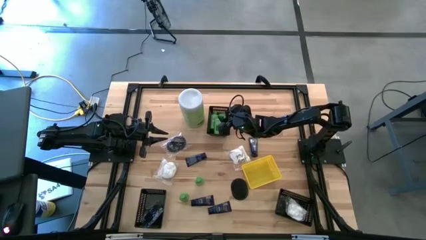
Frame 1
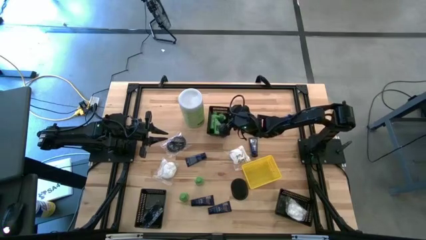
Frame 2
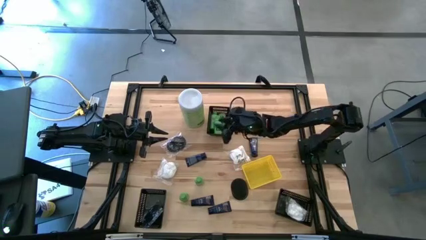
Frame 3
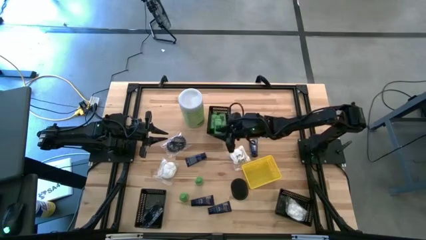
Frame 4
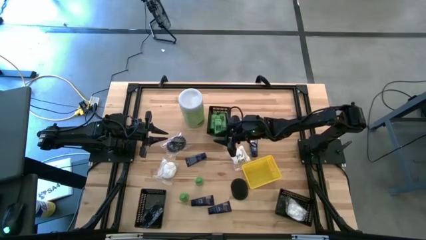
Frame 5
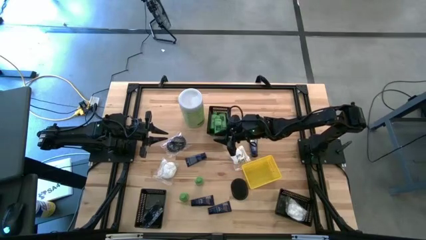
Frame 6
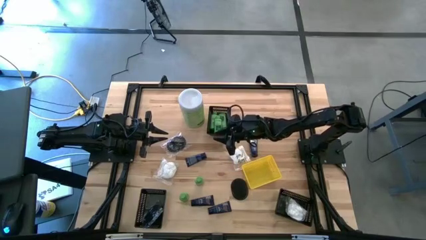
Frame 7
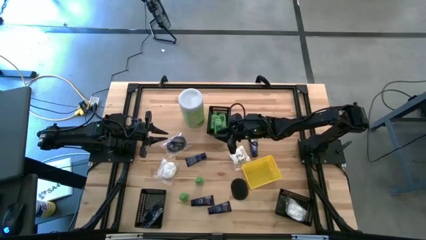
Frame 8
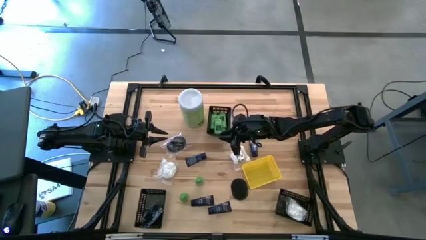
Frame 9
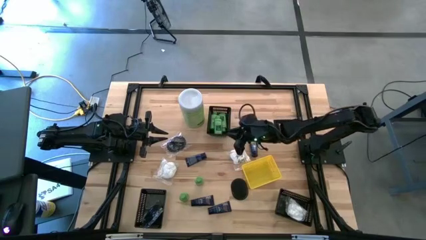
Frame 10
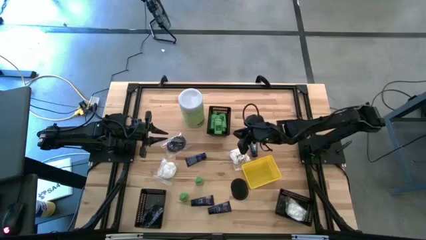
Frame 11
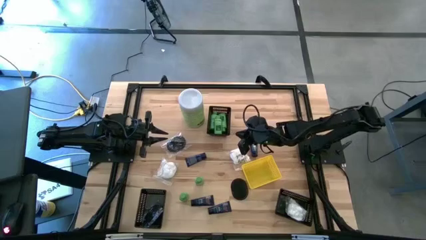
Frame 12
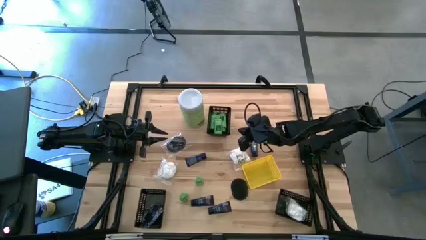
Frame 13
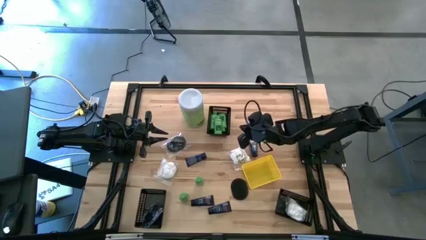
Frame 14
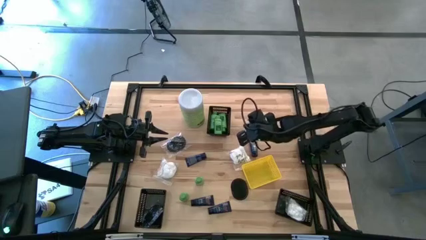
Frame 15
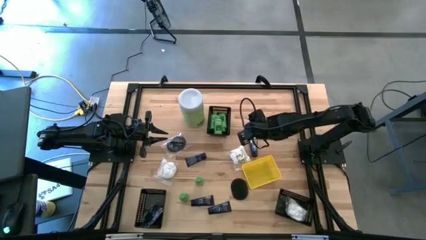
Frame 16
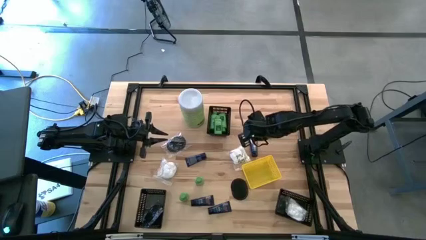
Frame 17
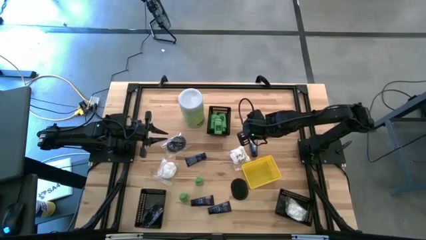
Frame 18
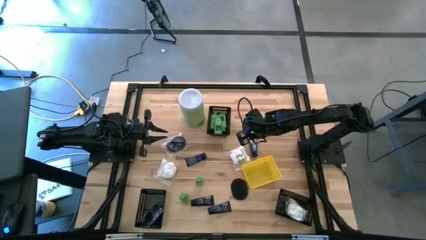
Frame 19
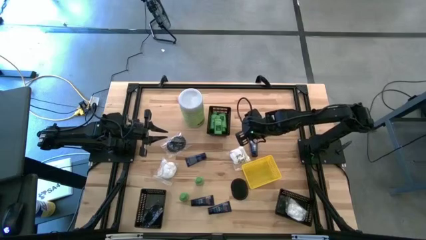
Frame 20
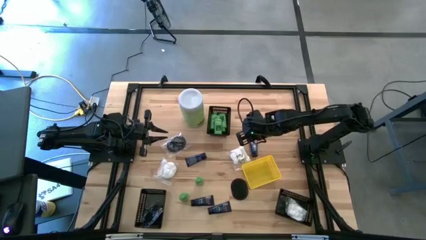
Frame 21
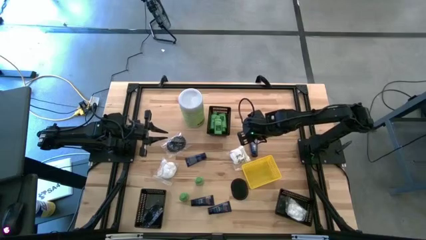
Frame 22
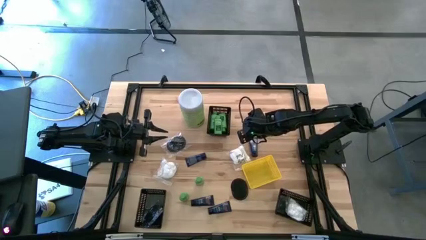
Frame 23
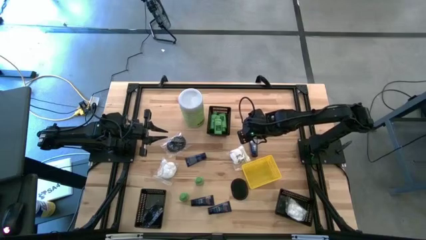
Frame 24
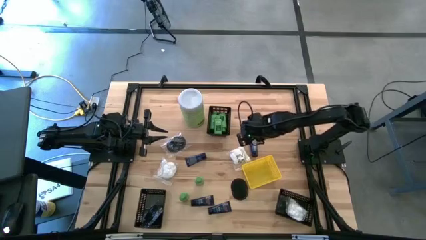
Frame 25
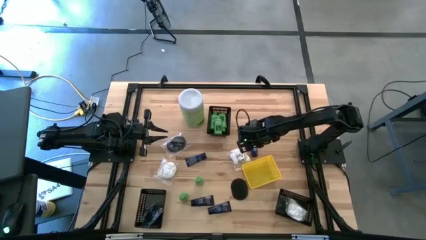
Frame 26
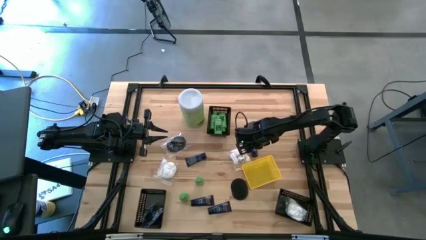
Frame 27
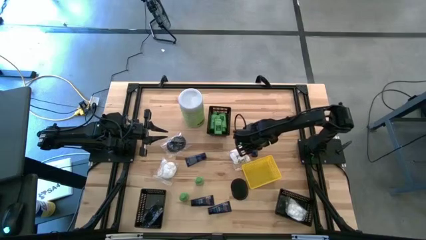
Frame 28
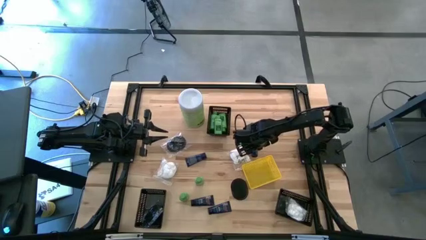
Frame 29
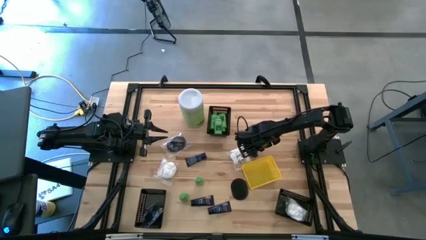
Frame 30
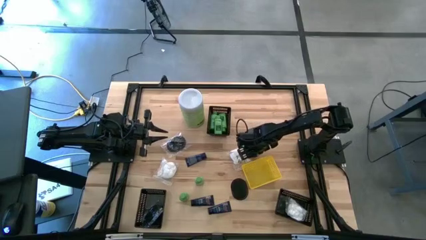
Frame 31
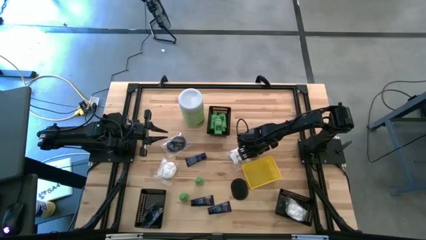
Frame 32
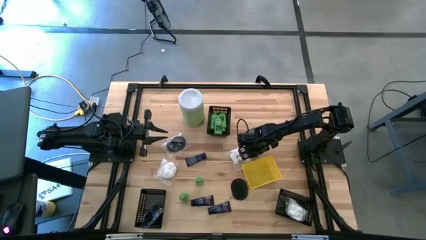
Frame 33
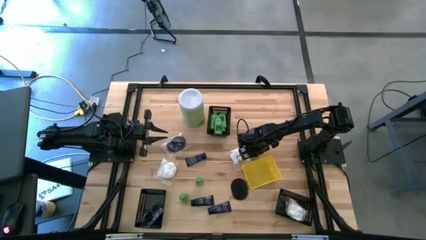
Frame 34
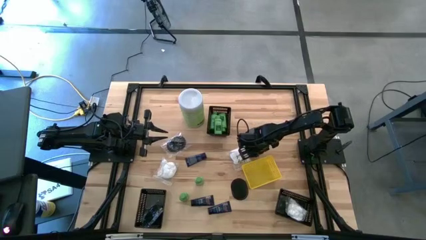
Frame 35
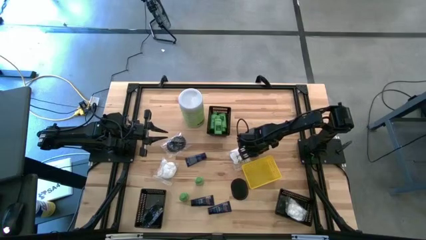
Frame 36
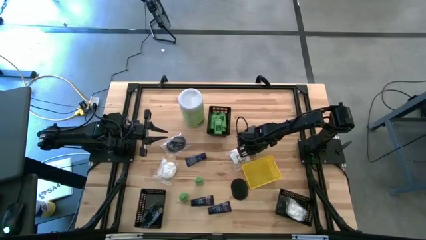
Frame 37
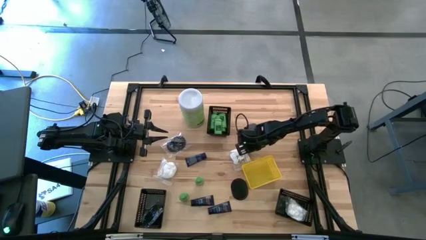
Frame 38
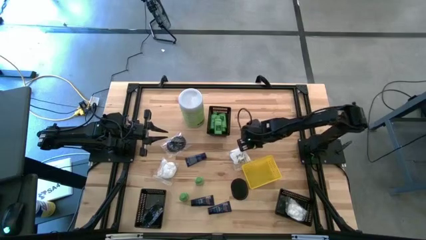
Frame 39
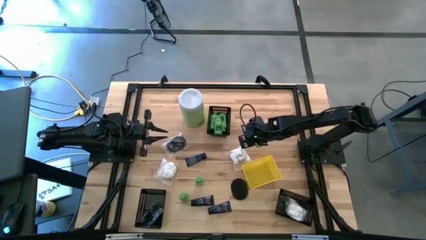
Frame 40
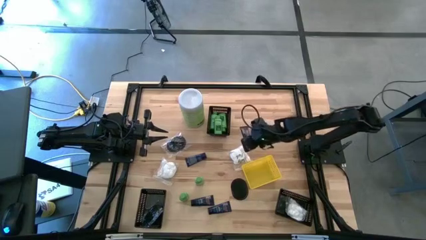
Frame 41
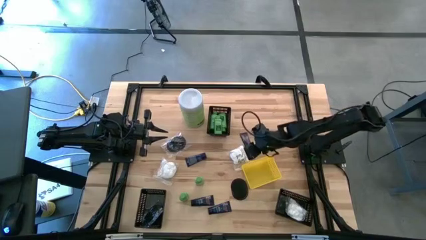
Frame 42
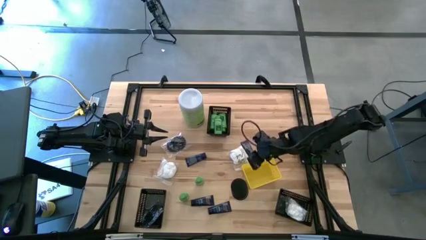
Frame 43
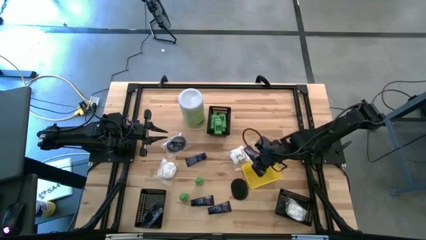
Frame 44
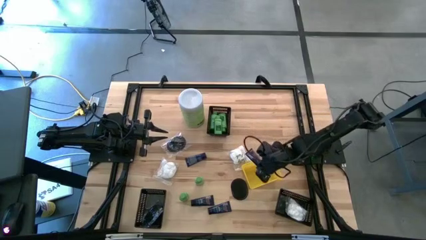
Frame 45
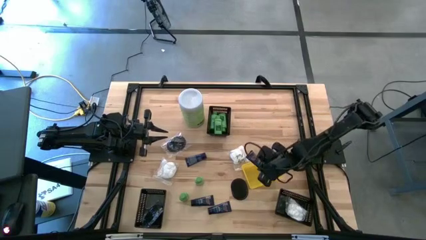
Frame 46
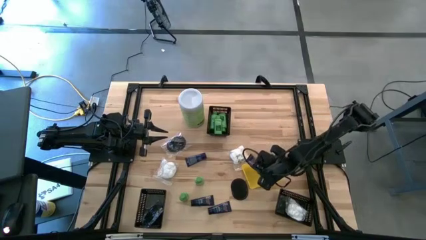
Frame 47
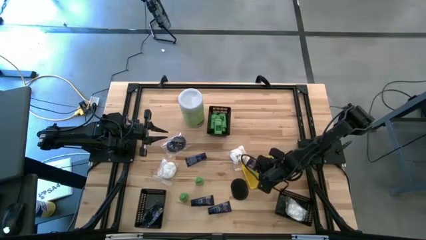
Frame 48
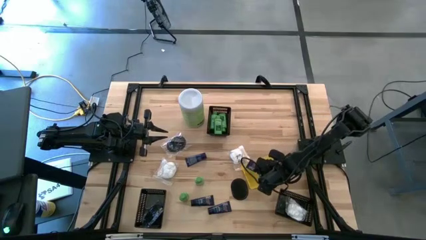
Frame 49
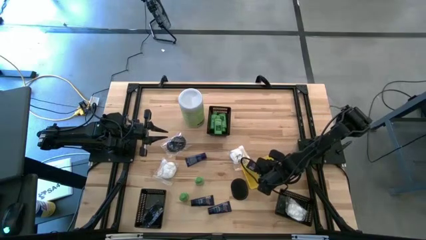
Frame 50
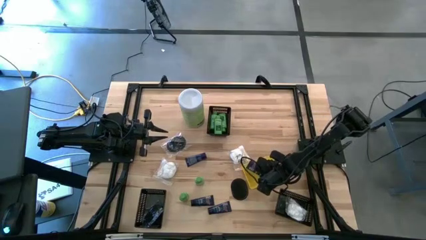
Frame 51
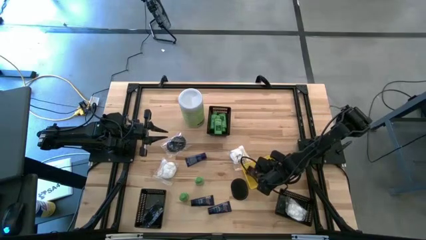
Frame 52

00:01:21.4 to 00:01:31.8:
Task: Pick & Place Travel size toiletries
Put the blue shave butter into the yellow bin

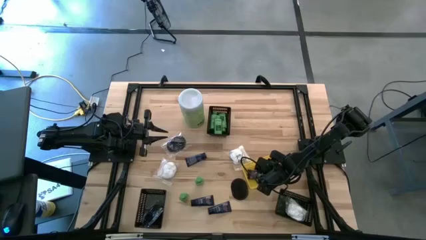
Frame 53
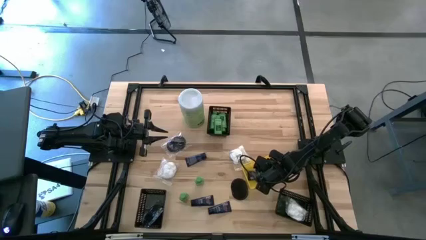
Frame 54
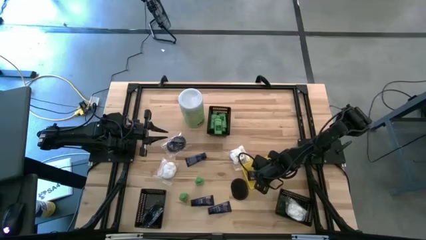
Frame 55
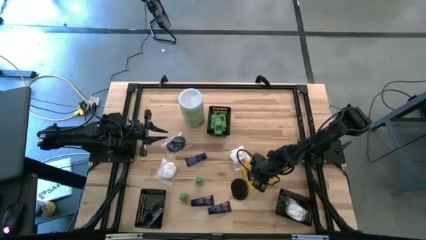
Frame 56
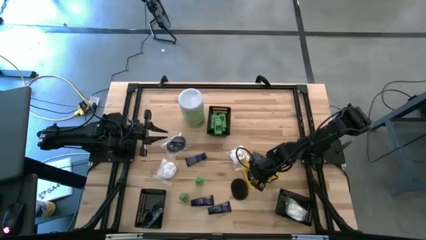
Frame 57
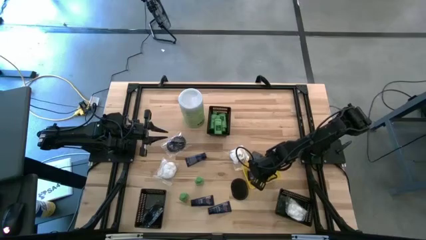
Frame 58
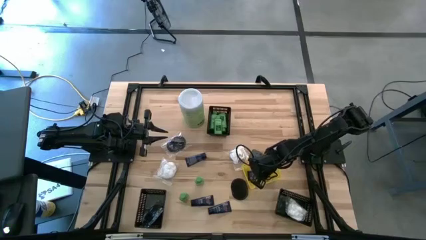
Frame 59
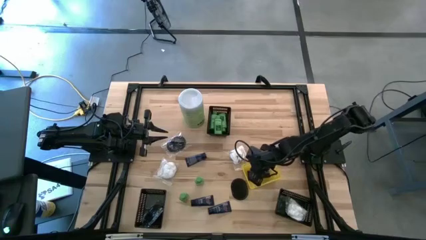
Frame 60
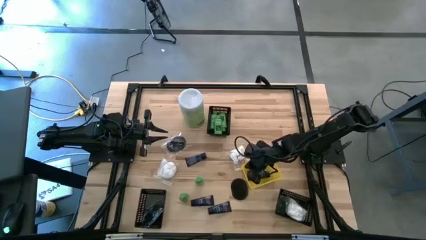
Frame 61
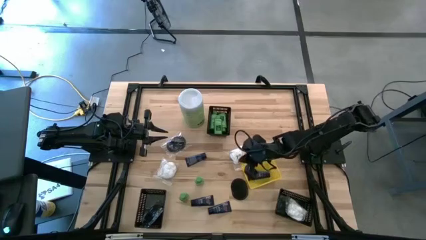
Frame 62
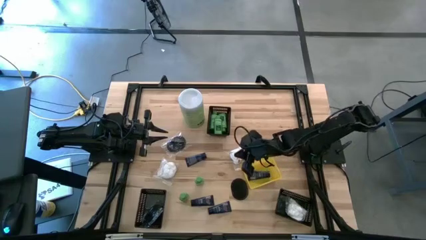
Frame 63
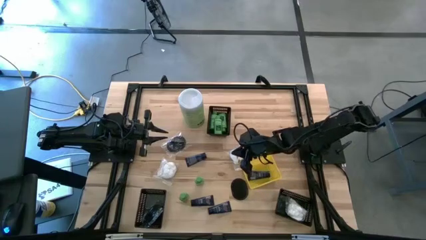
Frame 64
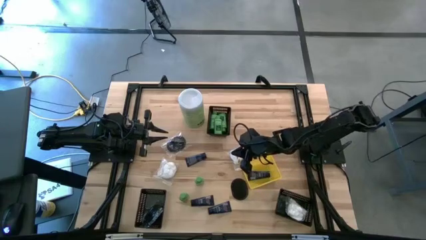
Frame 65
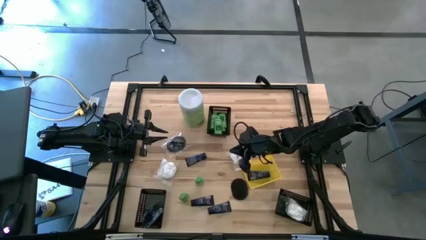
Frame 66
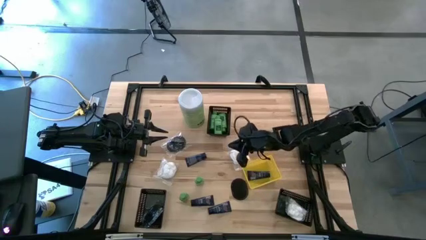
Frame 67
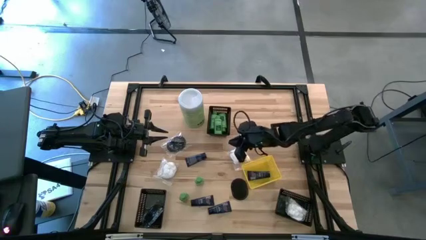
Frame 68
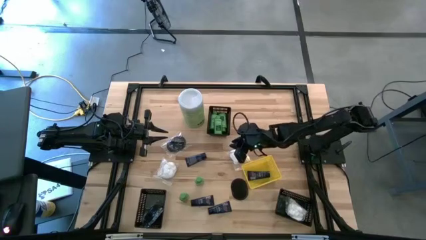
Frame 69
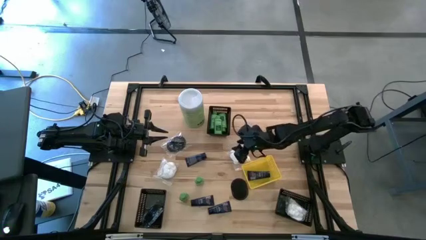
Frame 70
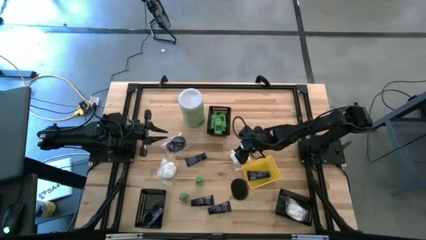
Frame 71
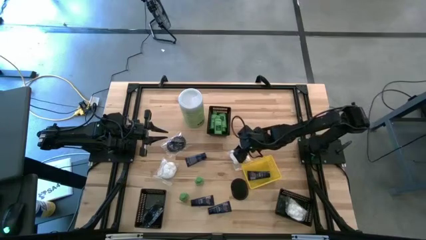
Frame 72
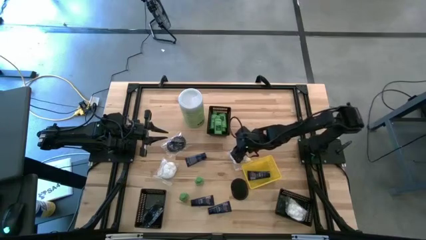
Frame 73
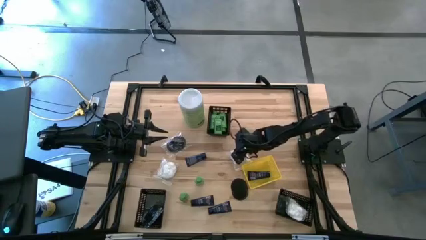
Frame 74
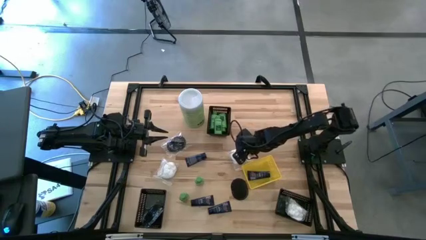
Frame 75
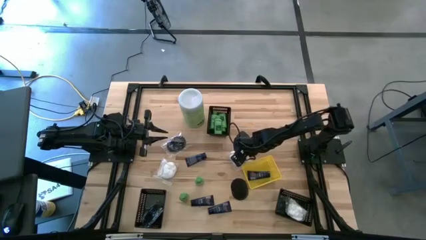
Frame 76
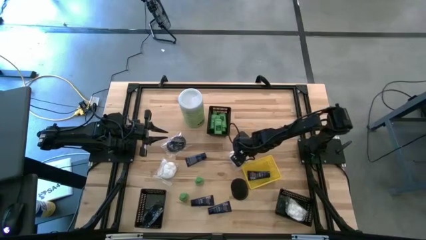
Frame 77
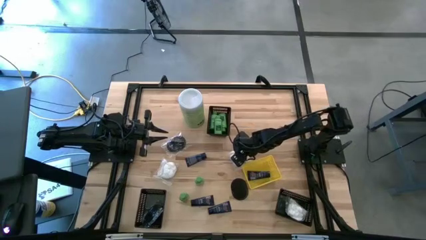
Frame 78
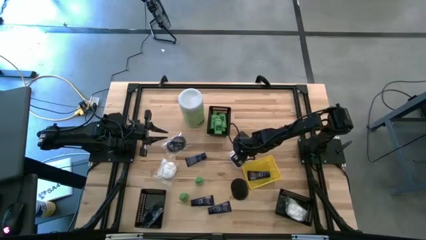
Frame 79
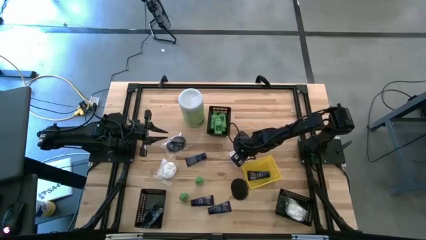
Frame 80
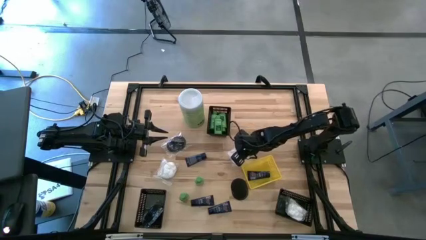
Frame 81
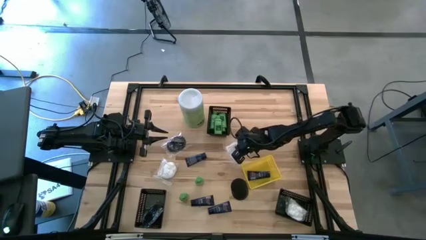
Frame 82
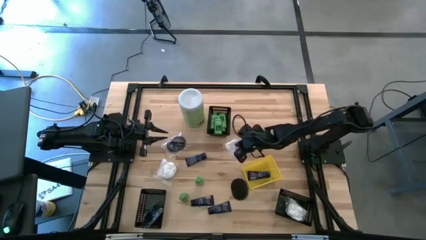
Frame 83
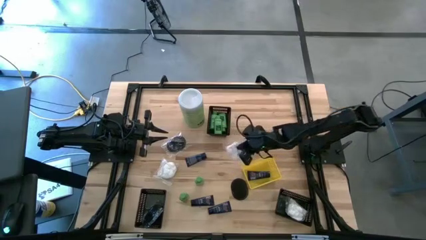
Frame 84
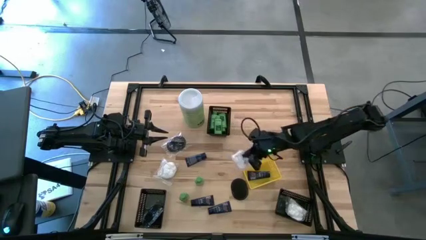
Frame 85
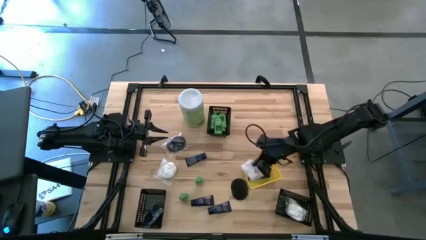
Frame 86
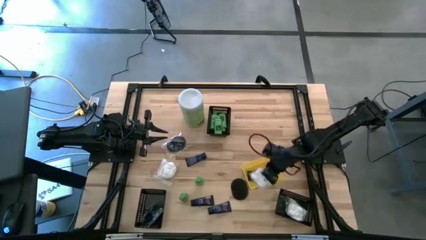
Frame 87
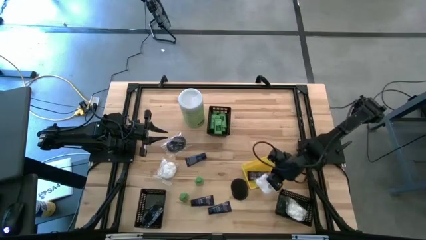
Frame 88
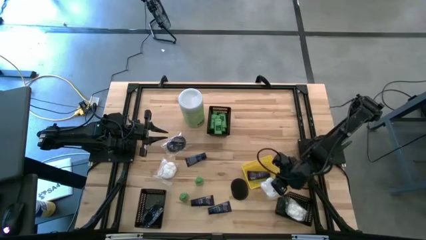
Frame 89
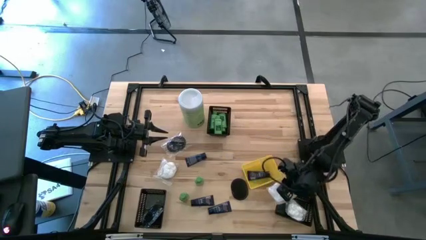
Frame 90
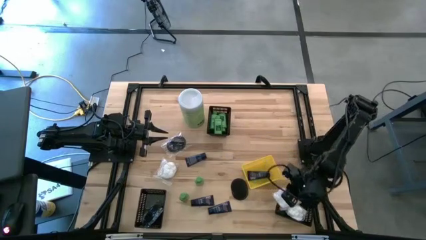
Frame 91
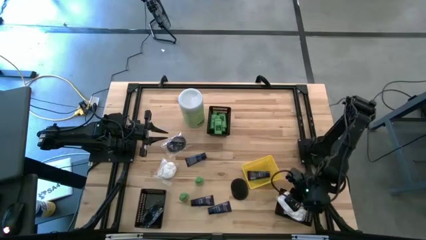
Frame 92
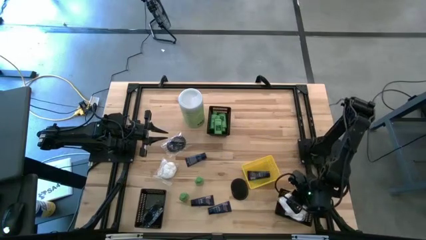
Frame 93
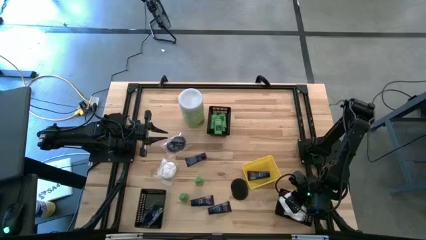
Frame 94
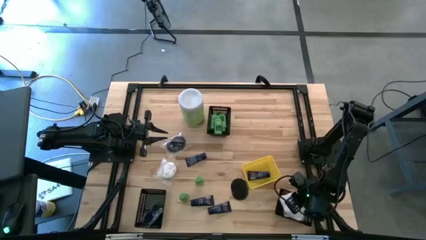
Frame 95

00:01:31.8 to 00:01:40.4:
Put the white cotton pack into the bottom right black bin
